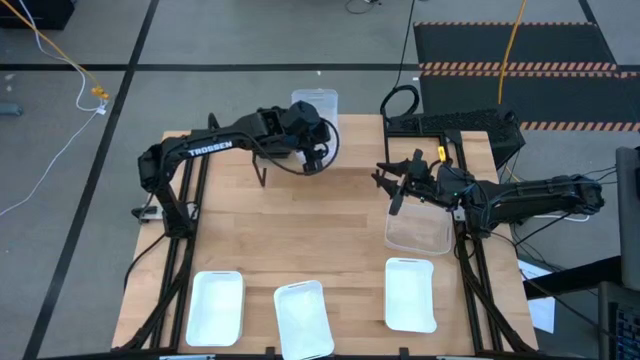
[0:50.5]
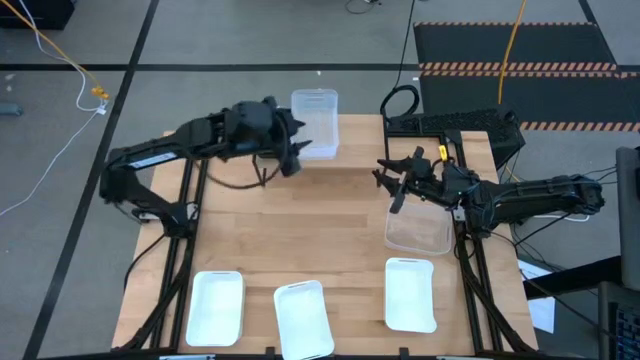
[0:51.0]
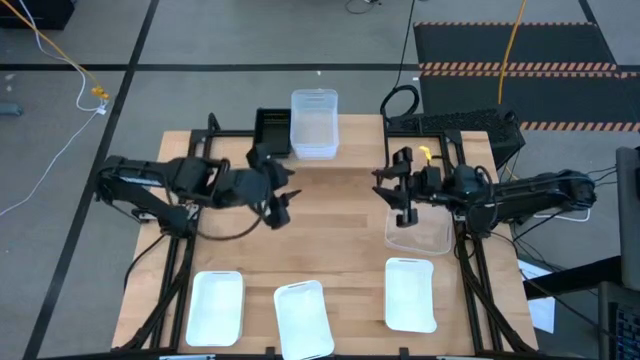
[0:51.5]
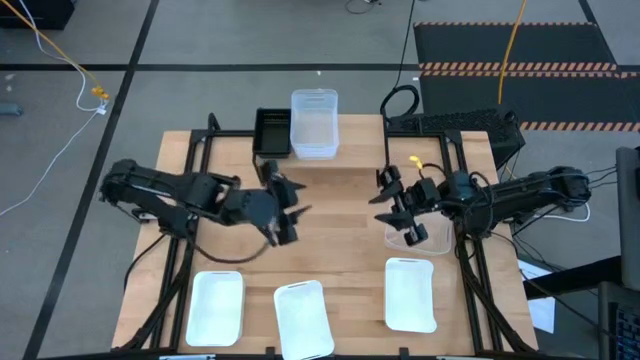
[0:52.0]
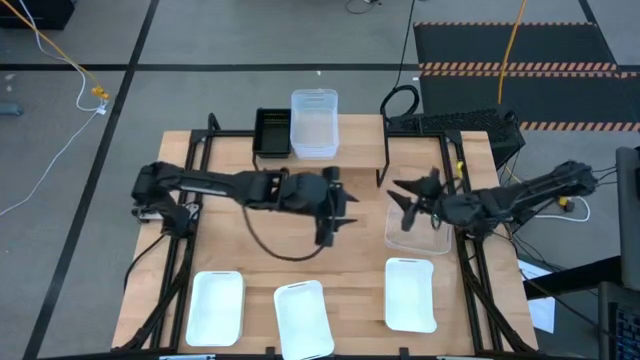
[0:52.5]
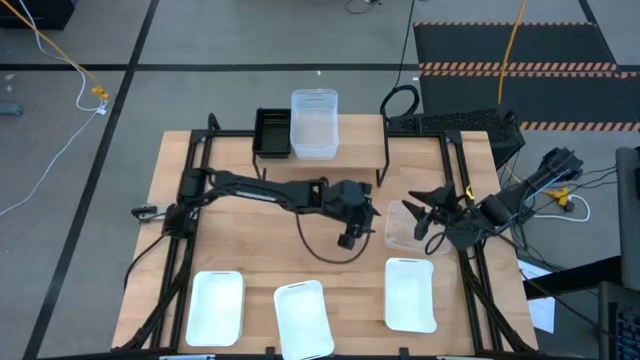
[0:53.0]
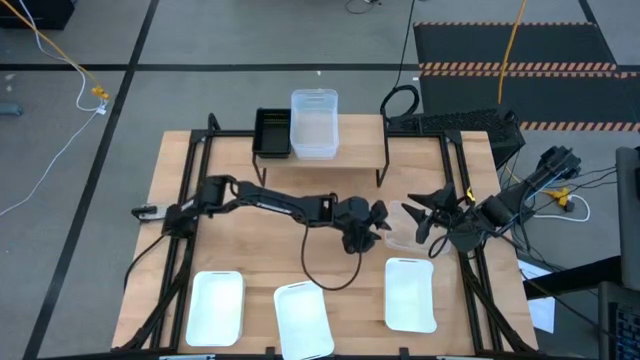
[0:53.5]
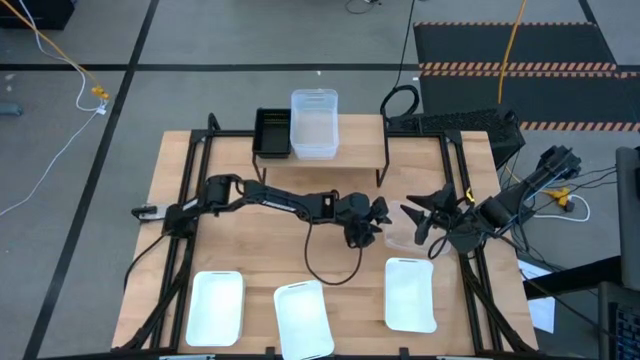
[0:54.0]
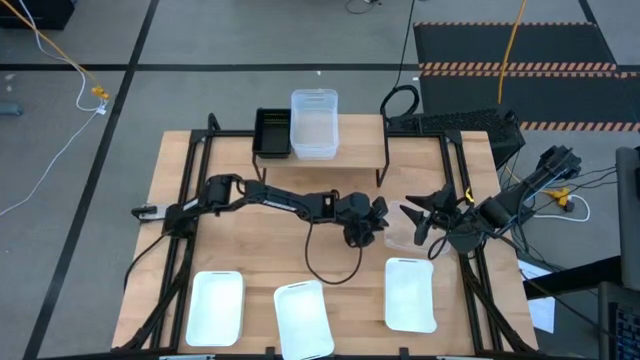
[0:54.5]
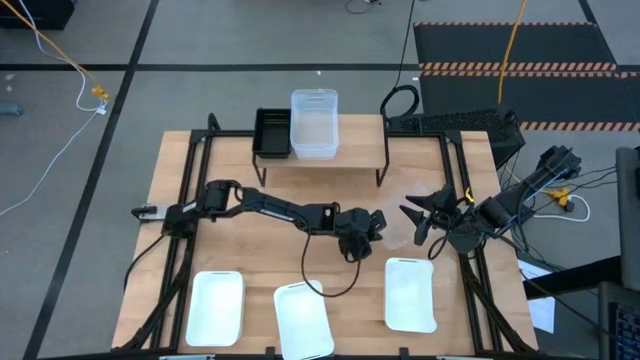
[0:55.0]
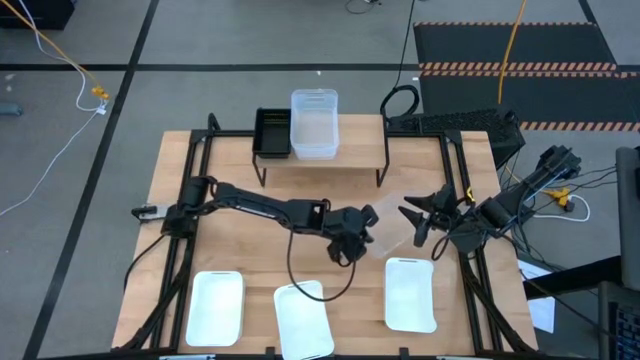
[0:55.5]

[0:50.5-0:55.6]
Task: Stack baskets on shelf by color
Stack the transparent bin on top of the other transparent bins on the shelf

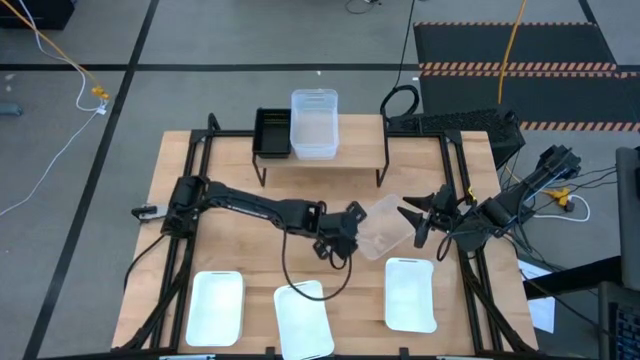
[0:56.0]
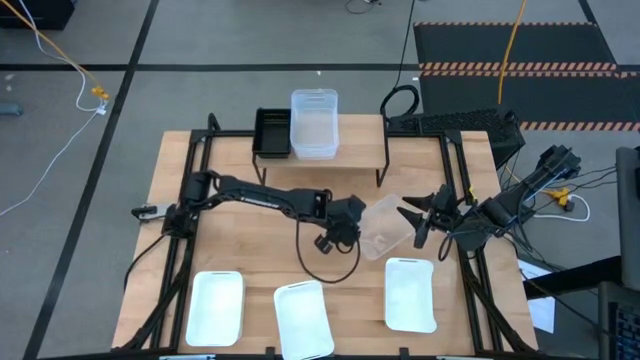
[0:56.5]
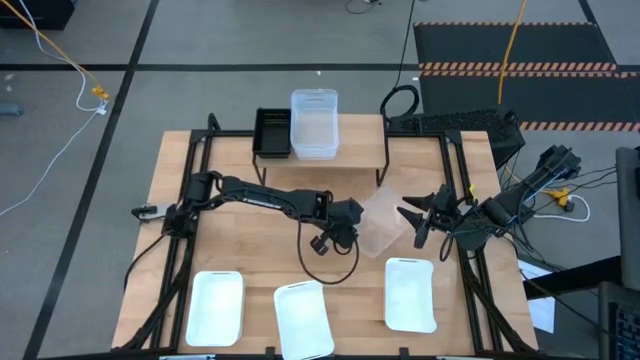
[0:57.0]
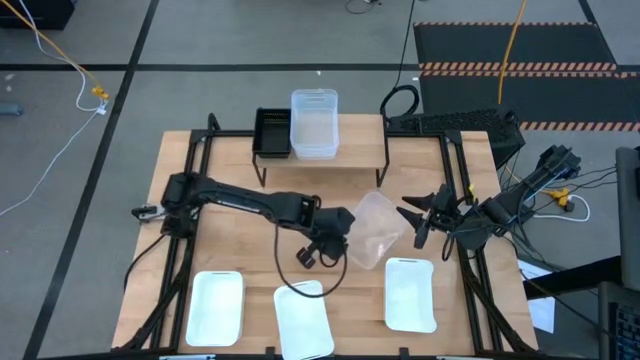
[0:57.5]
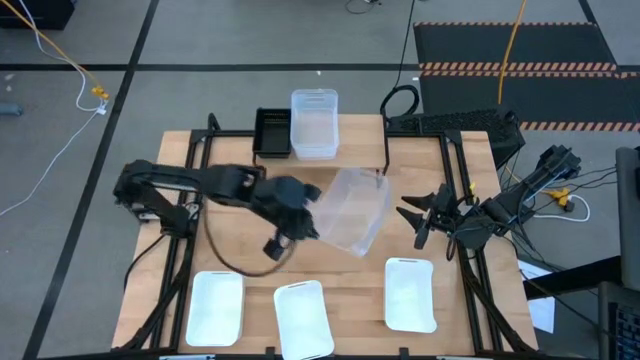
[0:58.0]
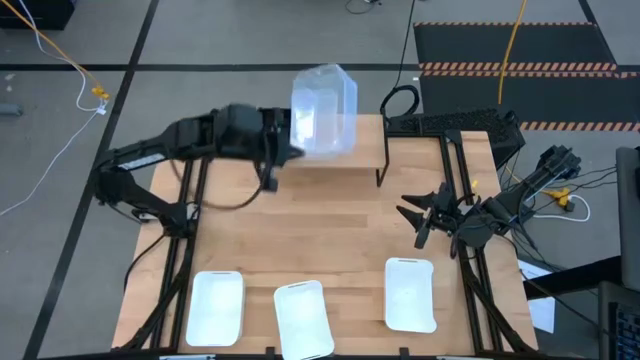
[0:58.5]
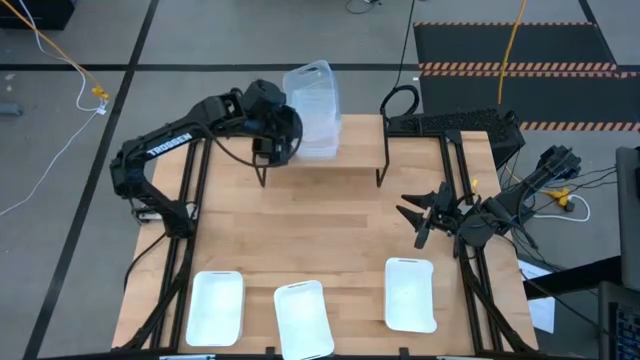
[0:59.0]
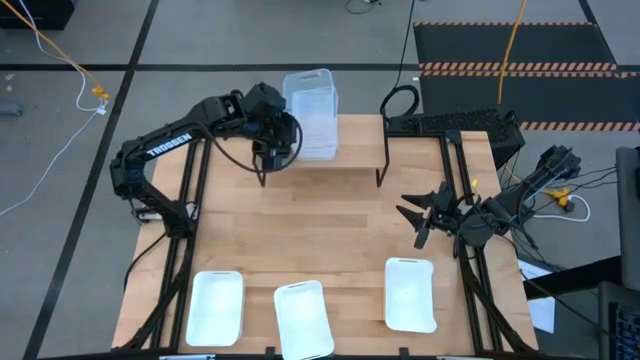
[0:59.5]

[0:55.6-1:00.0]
Stack the transparent bin on top of the other transparent bins on the shelf

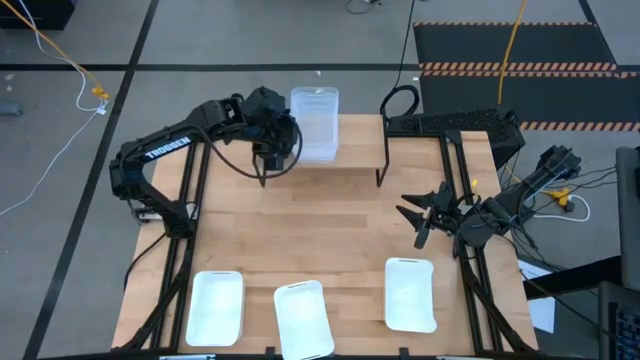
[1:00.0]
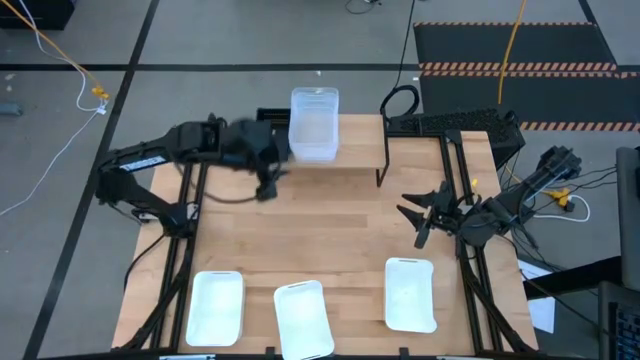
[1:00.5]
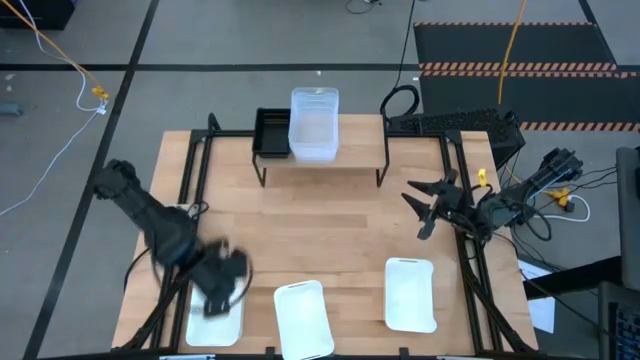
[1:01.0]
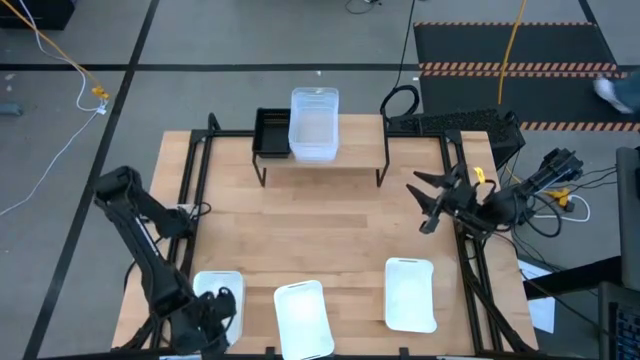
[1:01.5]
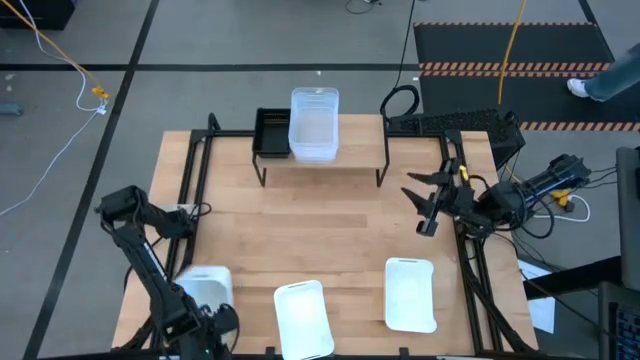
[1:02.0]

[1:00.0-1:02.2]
Put the left white bin on the shelf

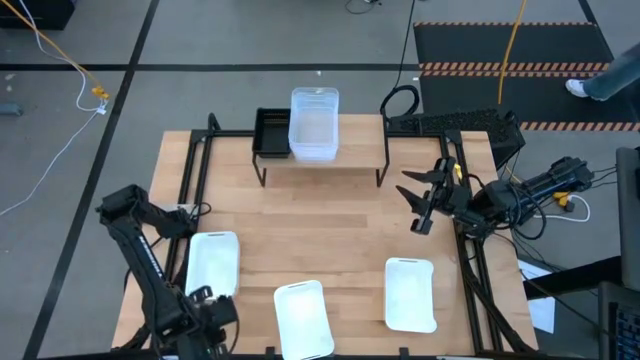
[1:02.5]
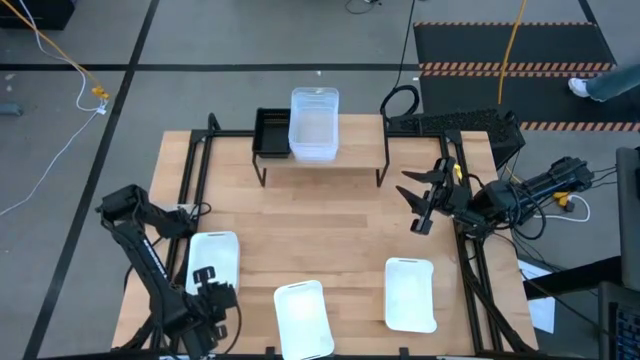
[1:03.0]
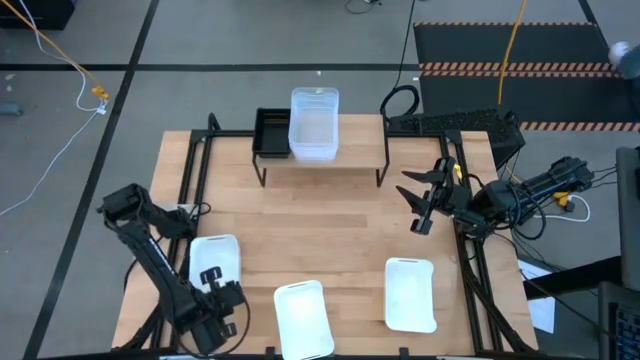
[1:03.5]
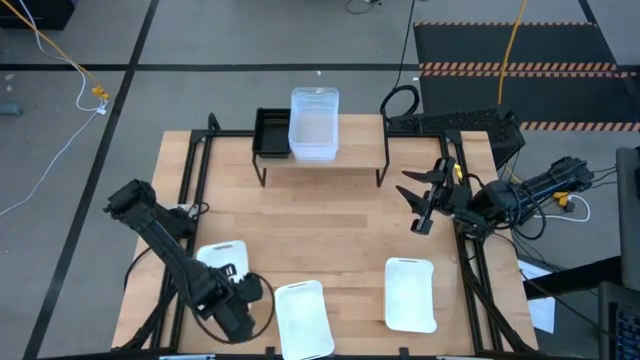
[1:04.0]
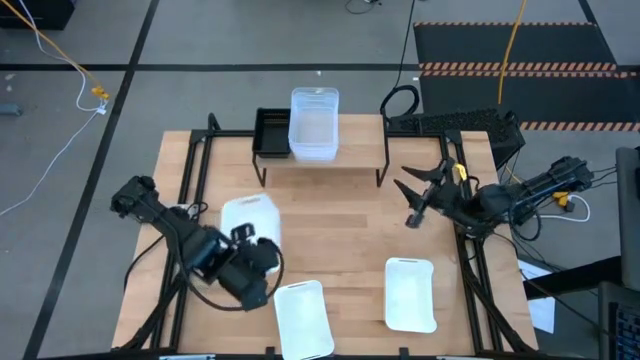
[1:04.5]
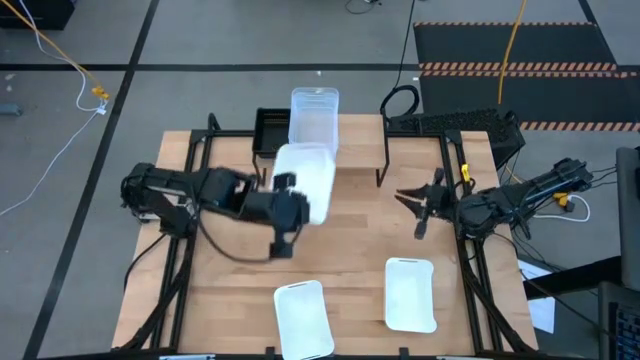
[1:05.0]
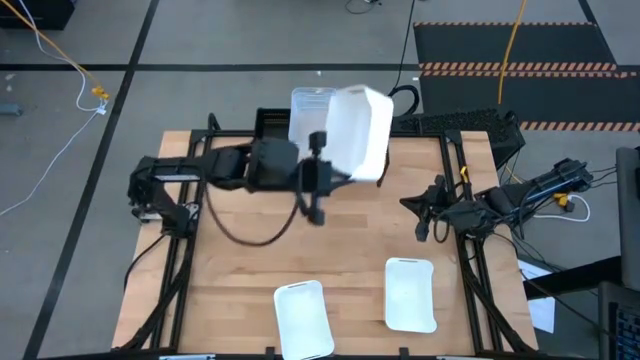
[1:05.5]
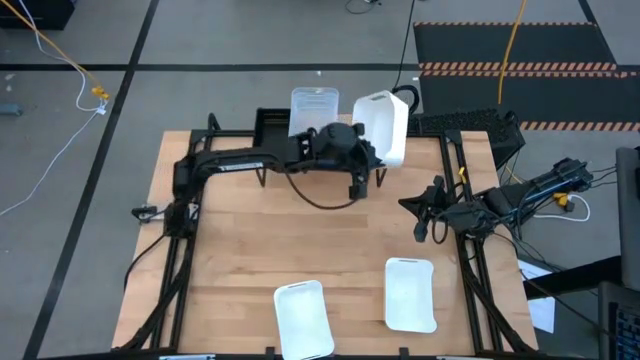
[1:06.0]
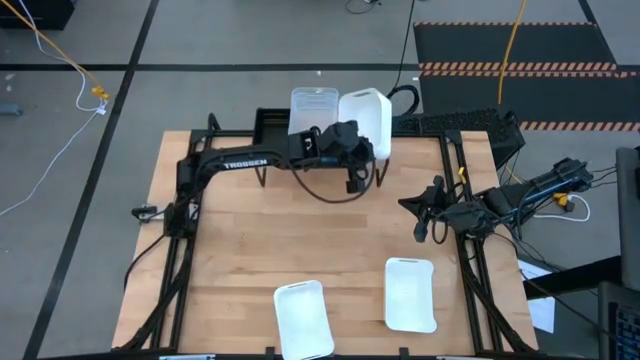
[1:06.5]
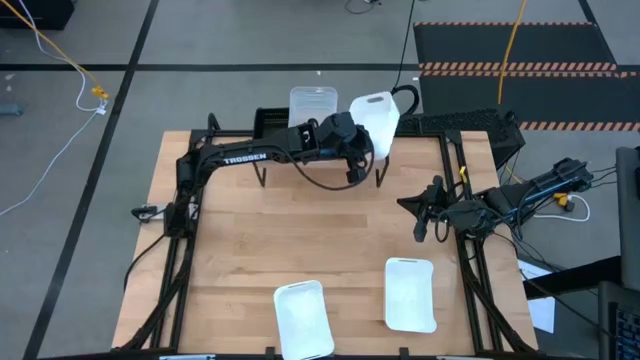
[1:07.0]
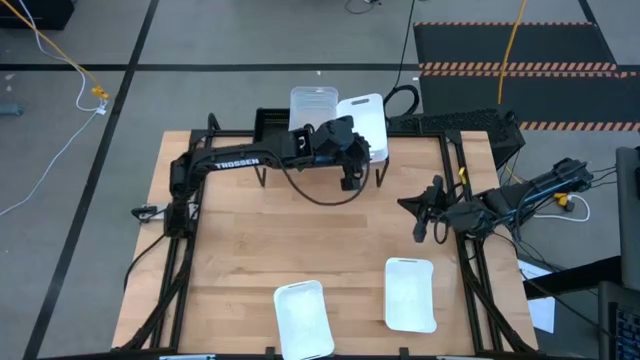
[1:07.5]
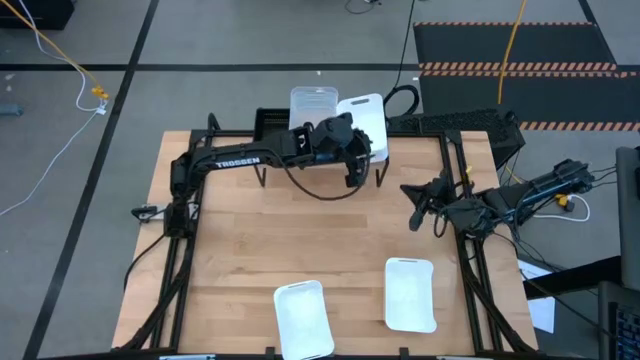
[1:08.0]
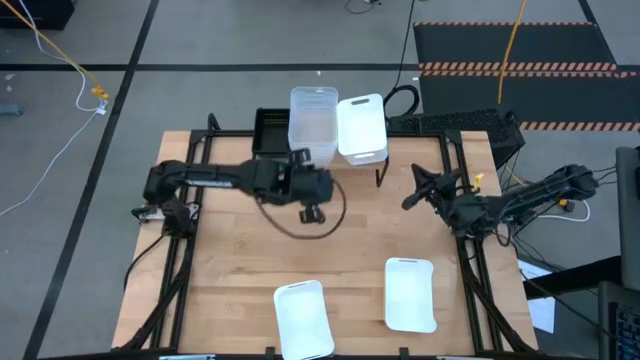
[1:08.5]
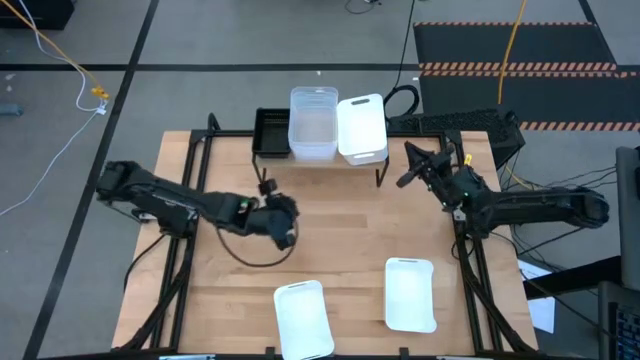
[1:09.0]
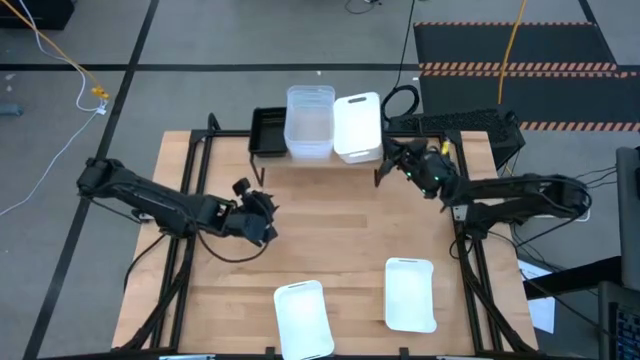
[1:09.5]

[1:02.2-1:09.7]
Put the left white bin on the shelf
